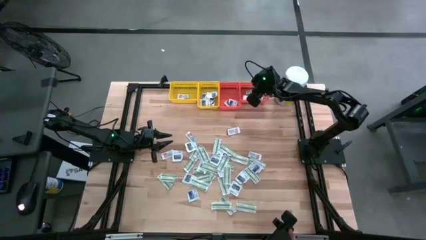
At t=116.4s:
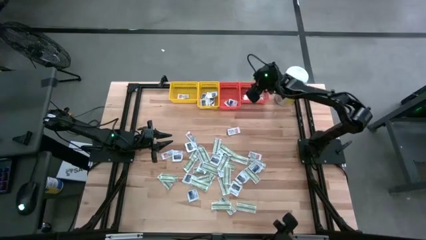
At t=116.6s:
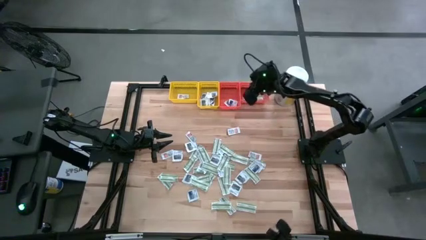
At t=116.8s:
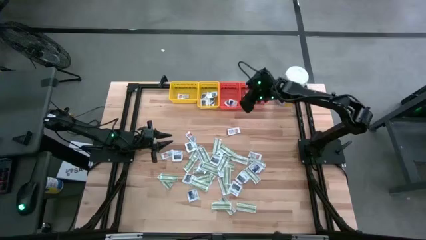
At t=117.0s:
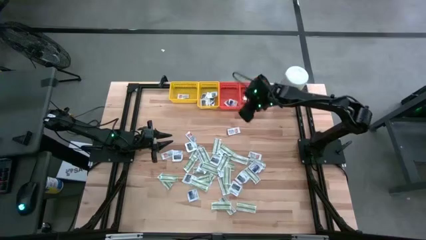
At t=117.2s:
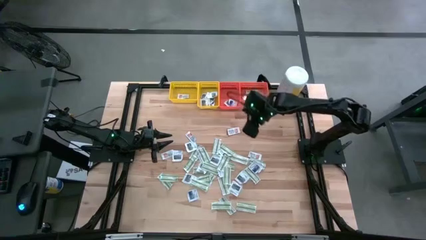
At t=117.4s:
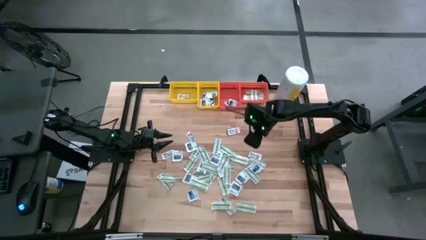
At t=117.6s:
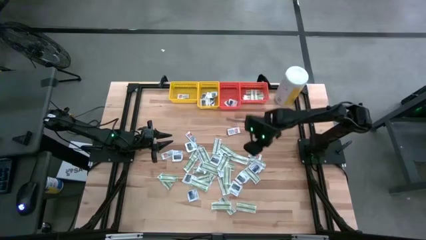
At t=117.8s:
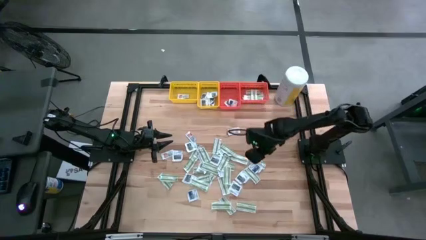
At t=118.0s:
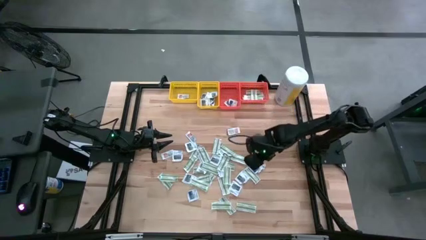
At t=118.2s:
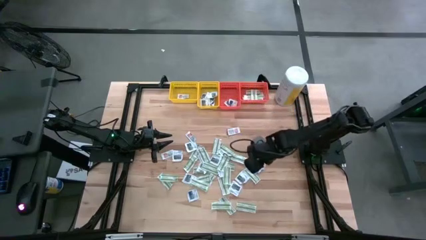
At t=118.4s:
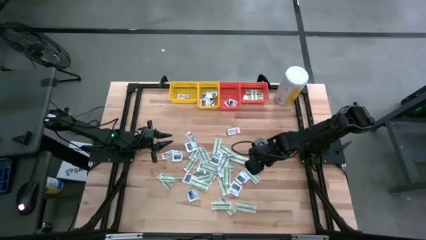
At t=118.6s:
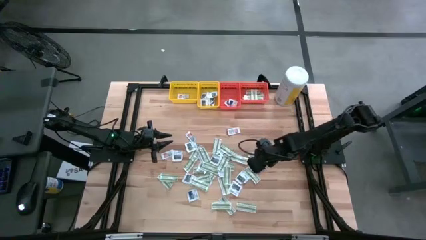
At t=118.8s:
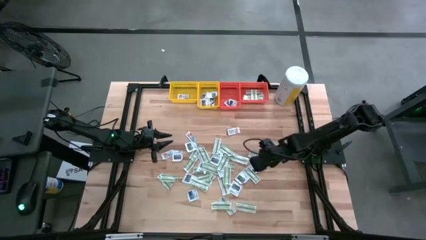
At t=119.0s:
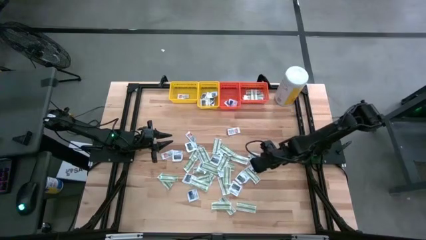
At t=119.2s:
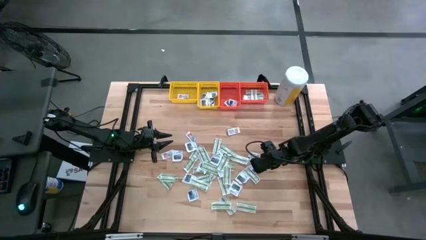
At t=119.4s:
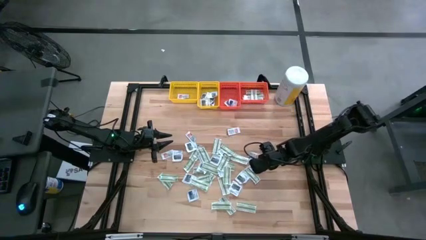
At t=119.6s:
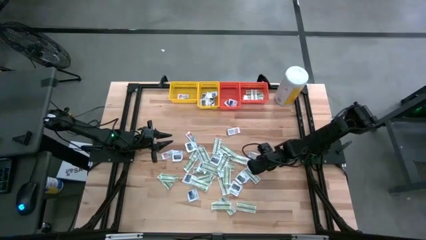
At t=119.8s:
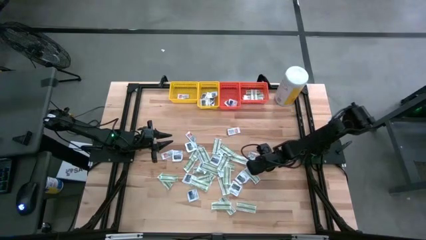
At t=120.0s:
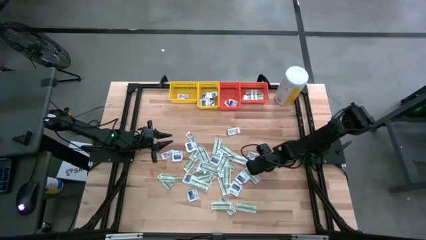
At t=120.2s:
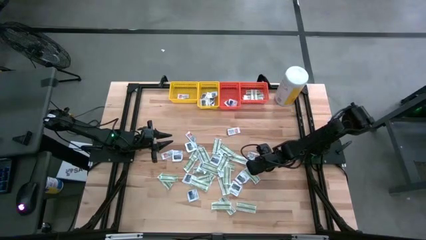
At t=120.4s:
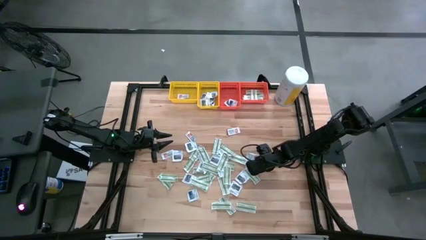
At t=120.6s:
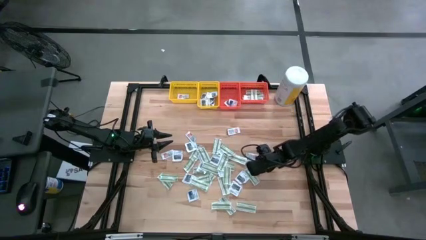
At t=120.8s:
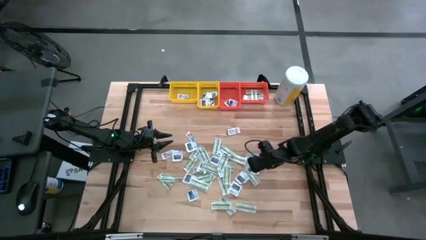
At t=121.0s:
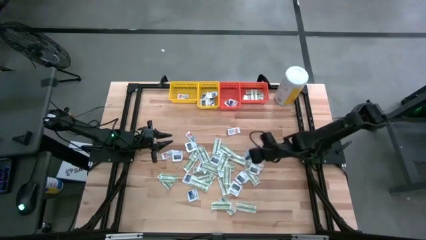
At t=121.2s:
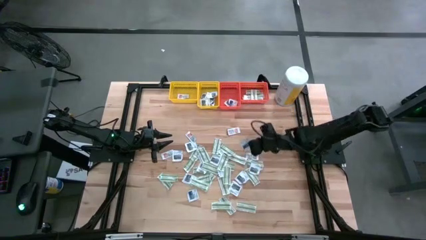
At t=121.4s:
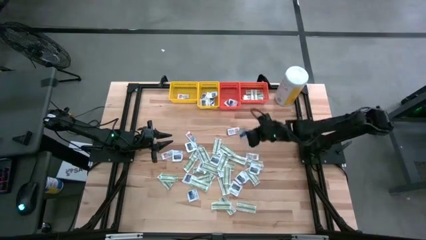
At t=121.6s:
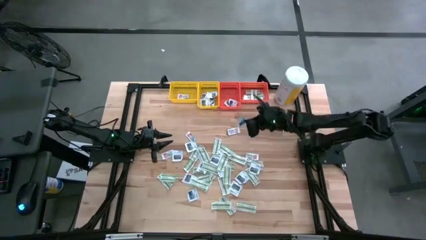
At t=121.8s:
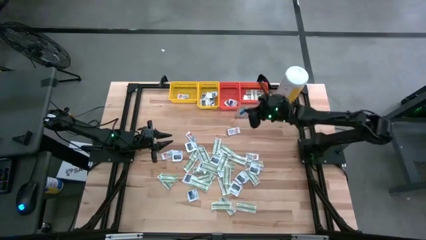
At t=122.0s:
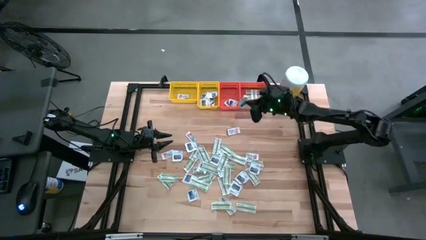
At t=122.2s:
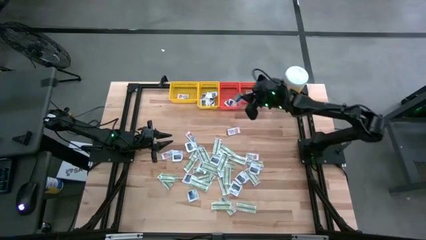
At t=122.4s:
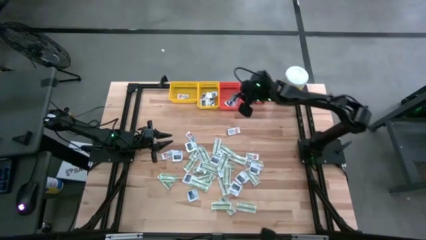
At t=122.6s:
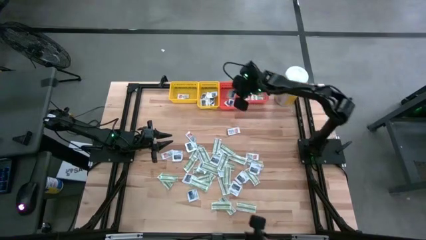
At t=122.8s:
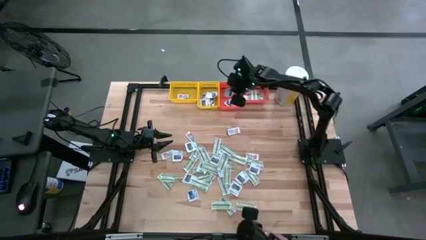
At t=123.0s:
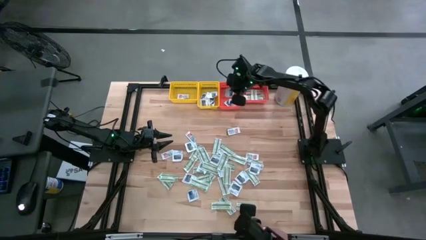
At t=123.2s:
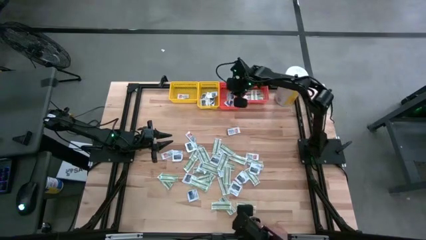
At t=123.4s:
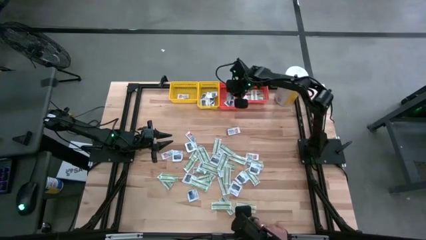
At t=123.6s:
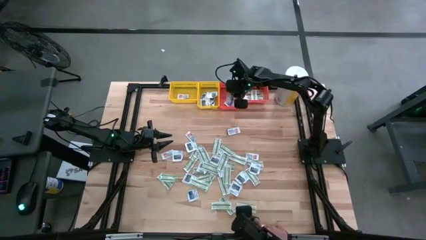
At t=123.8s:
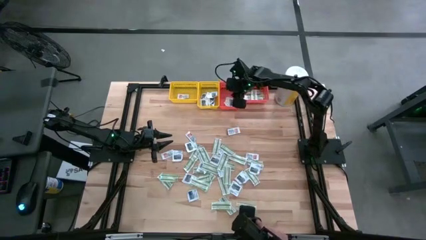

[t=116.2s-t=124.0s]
Task: Pick & Place First Aid Supplies
Put the blue pad into the left orange bin

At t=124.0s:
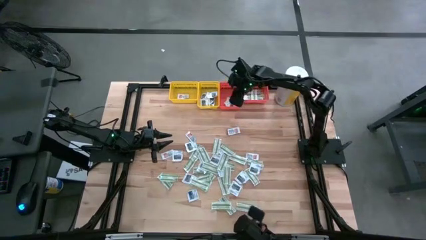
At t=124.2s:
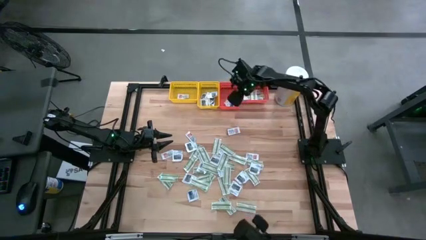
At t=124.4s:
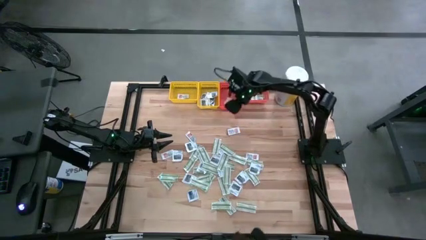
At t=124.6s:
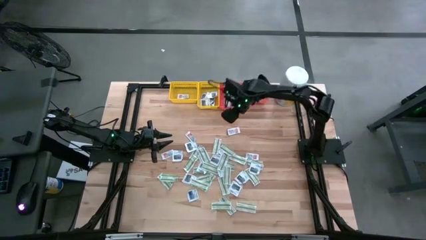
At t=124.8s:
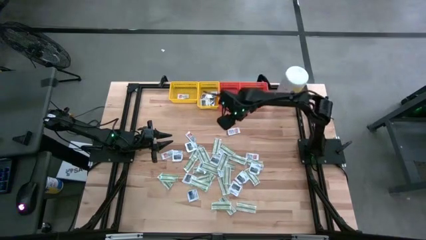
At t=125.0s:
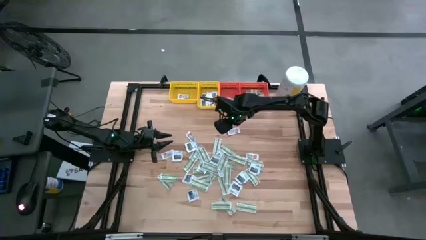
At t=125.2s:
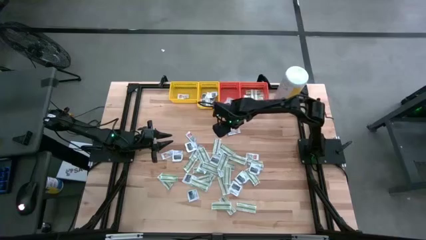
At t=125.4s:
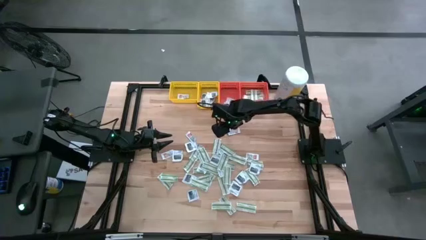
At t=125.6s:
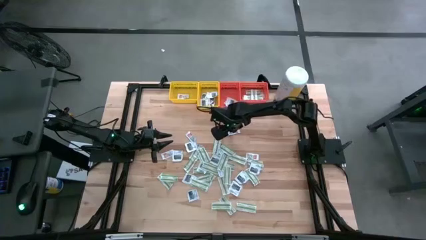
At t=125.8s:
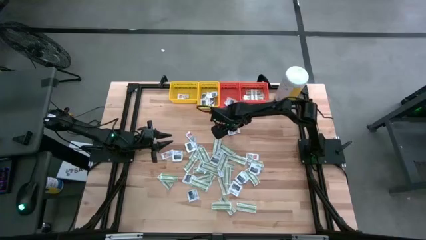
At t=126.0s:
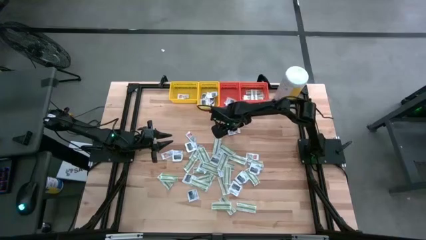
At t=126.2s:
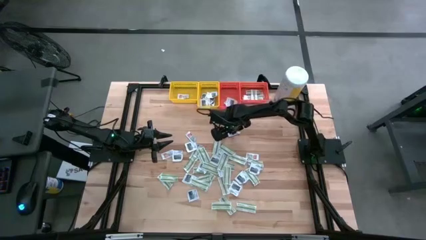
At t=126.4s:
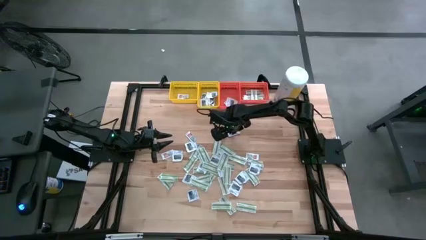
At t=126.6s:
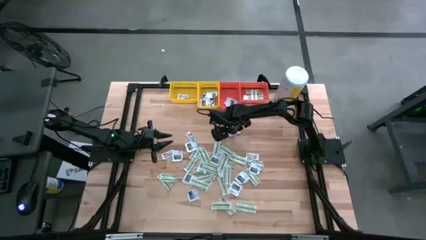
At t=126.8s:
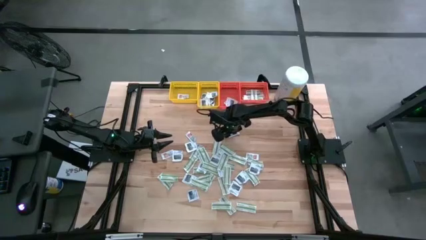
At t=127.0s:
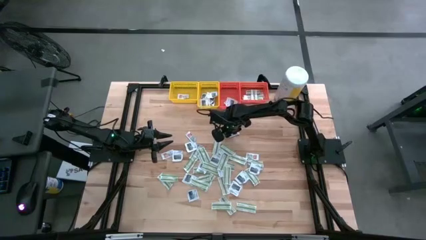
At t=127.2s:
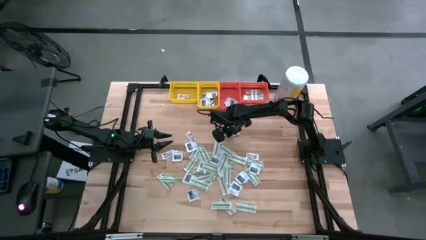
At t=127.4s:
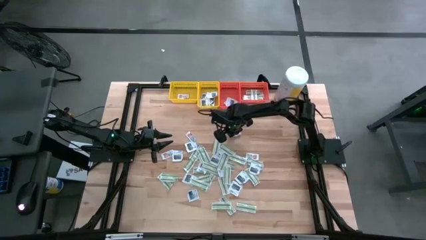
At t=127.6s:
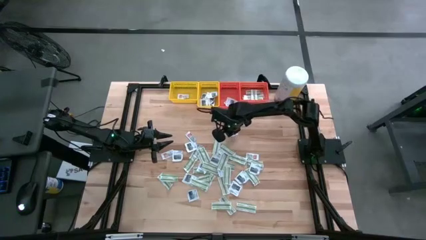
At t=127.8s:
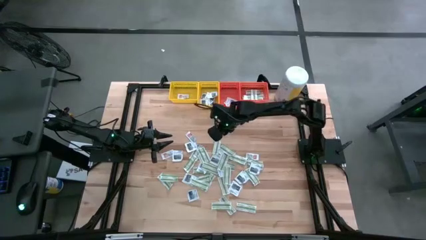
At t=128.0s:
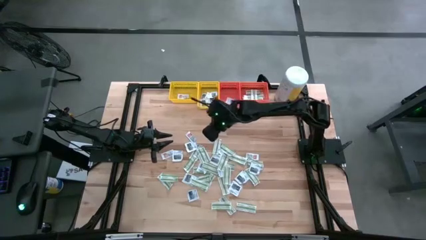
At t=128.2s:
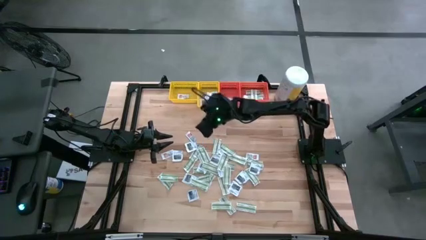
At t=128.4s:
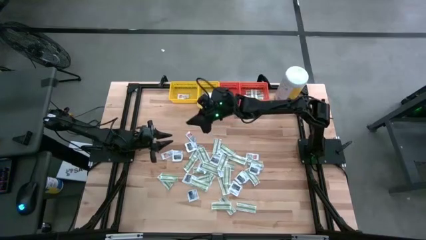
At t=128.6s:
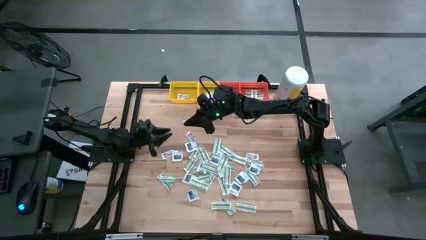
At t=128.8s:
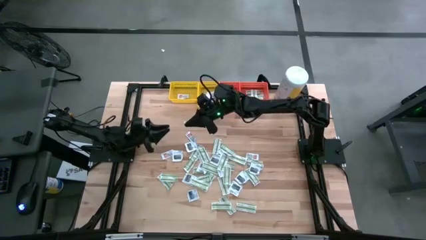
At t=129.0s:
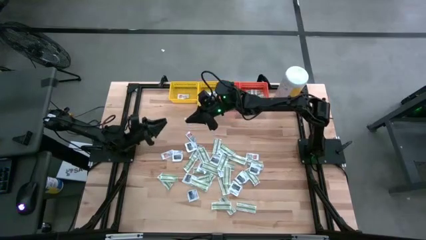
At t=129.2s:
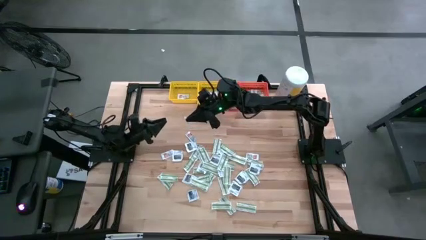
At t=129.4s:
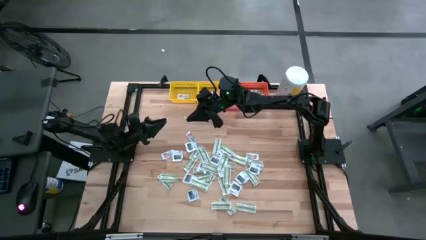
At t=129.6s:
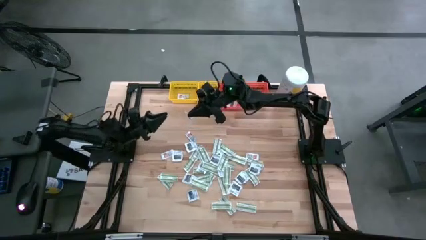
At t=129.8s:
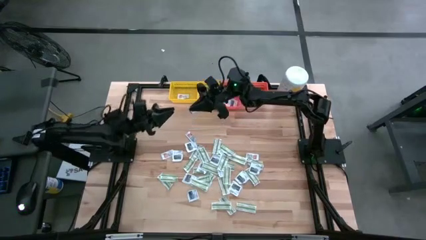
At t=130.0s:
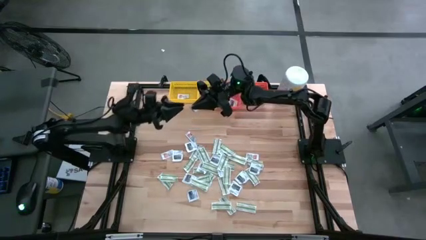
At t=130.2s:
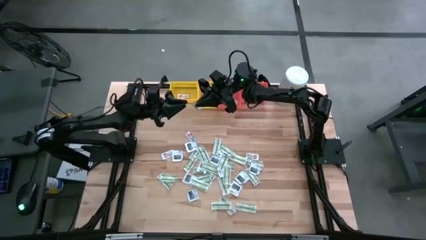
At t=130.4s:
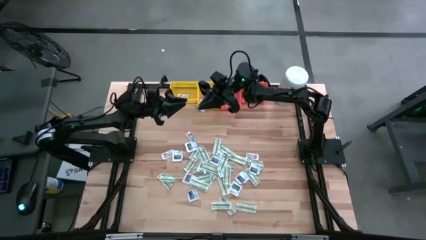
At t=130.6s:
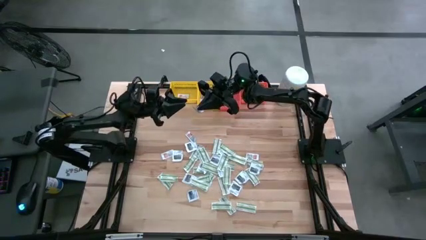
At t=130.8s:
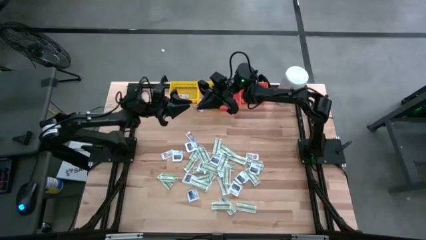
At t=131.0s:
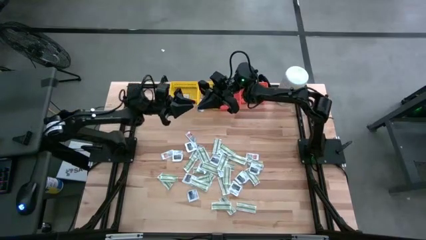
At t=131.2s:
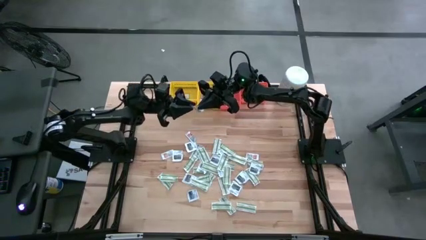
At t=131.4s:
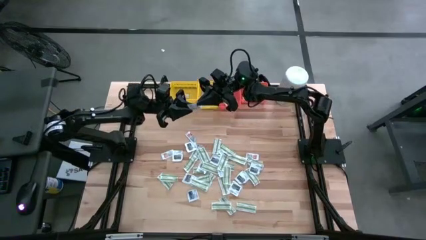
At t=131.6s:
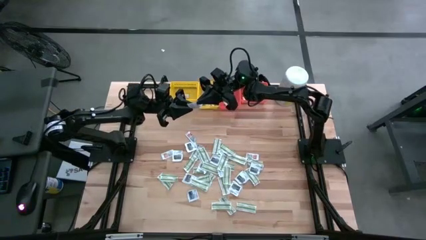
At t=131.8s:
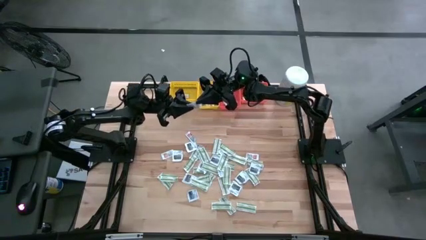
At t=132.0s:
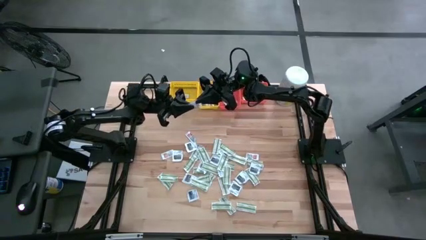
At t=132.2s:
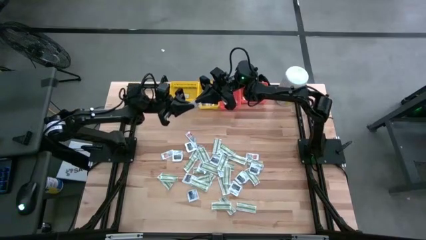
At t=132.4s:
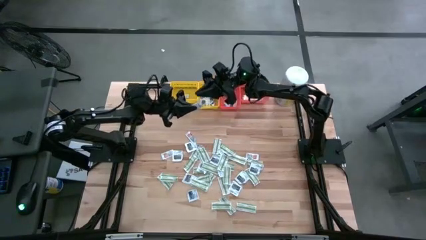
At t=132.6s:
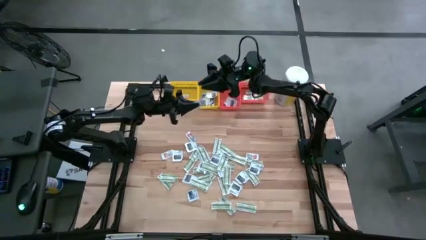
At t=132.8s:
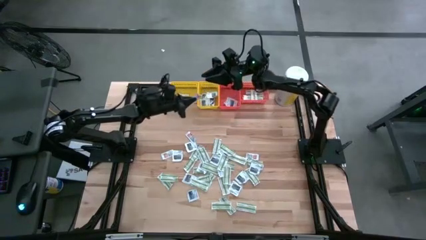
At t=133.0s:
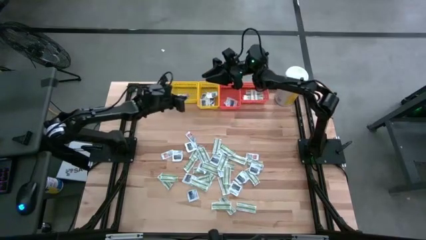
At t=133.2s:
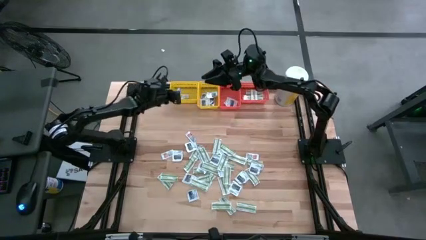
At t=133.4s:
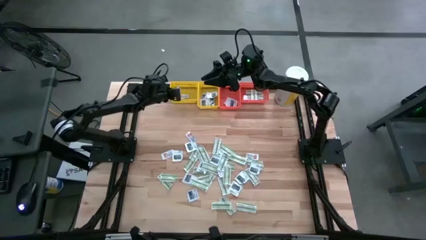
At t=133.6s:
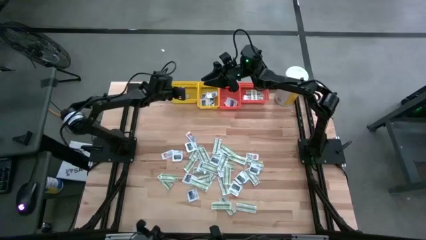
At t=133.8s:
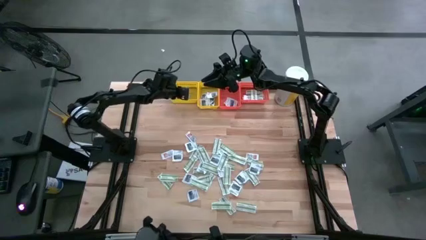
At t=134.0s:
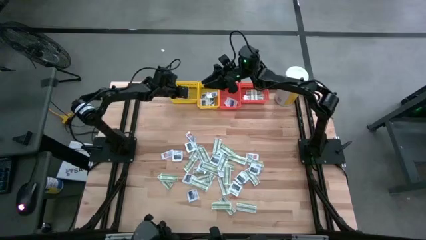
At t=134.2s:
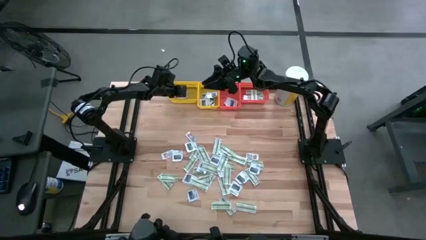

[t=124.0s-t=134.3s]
Put the orange packet into the left yellow bin
